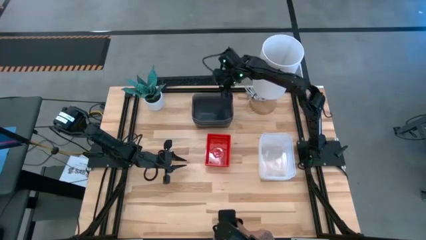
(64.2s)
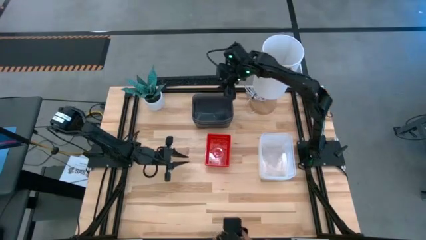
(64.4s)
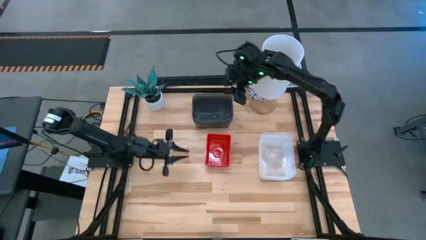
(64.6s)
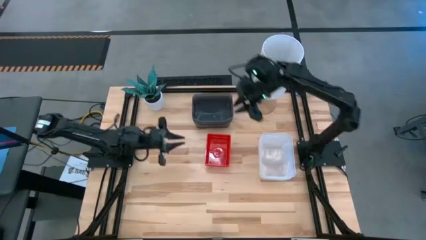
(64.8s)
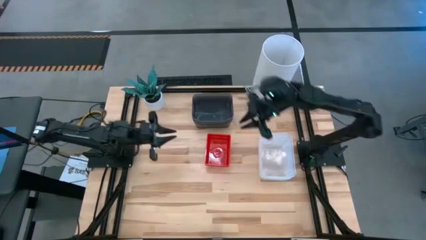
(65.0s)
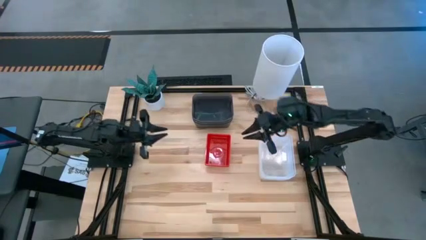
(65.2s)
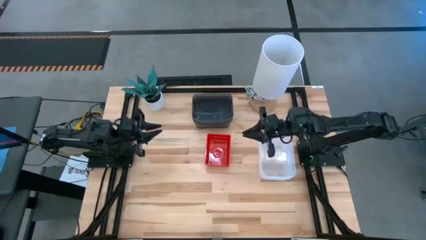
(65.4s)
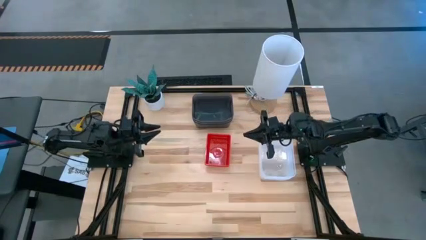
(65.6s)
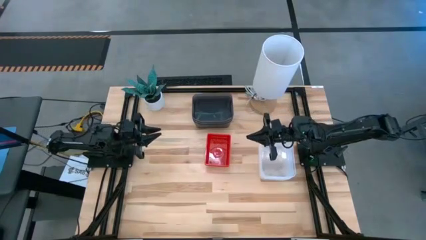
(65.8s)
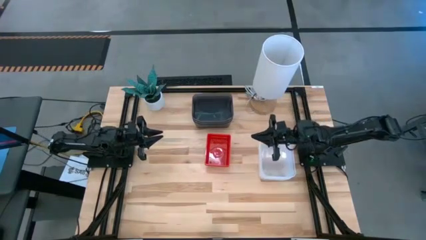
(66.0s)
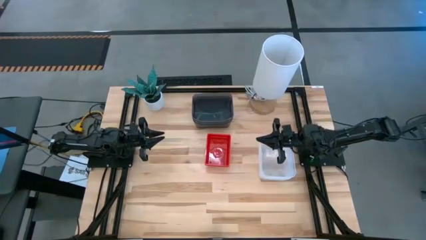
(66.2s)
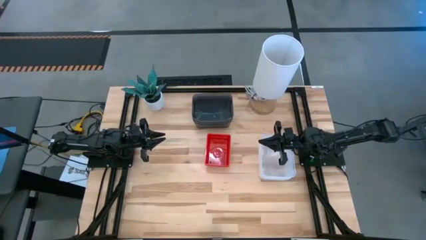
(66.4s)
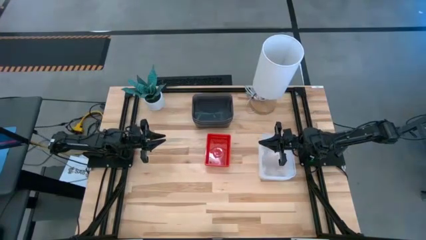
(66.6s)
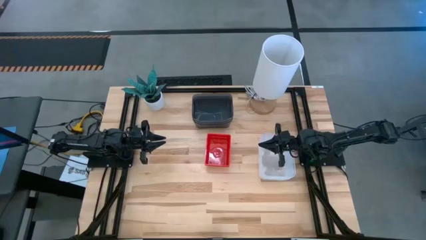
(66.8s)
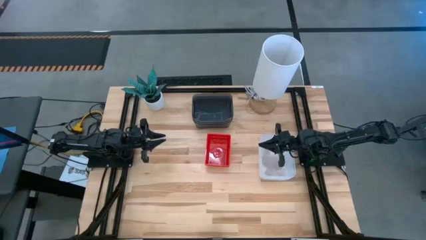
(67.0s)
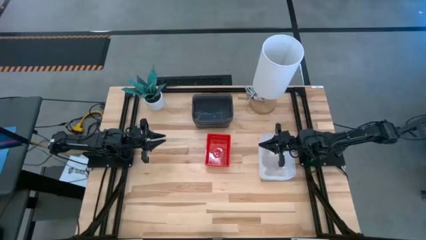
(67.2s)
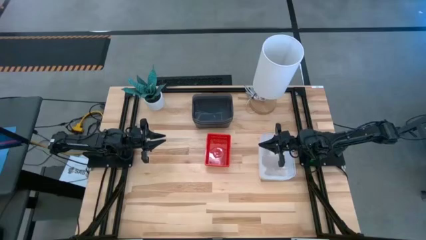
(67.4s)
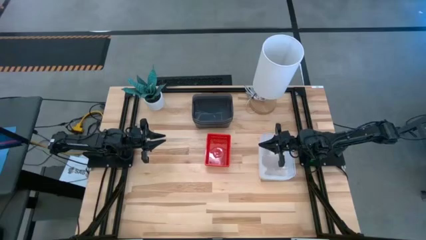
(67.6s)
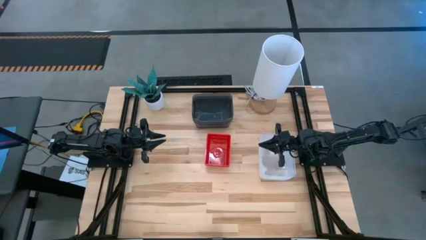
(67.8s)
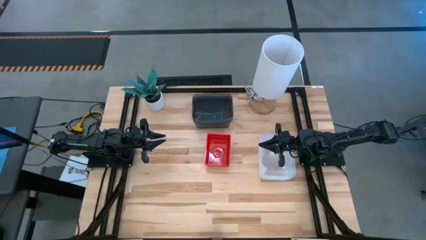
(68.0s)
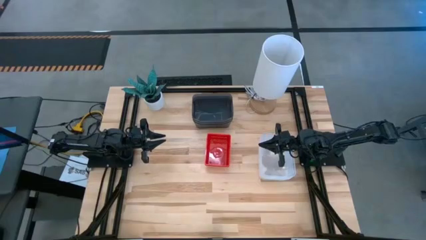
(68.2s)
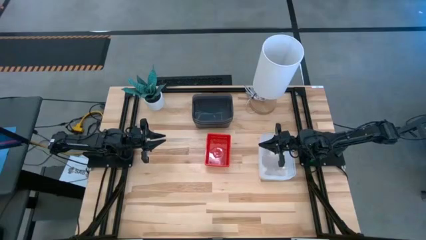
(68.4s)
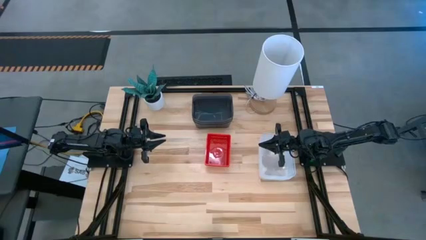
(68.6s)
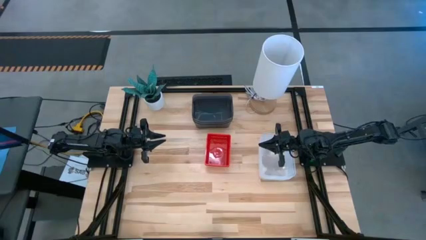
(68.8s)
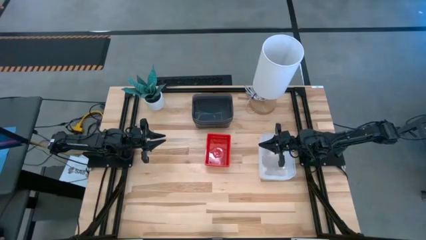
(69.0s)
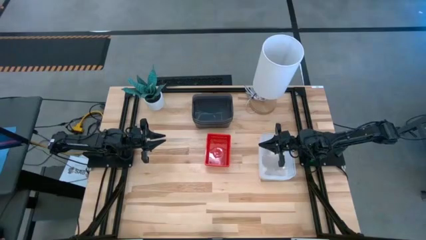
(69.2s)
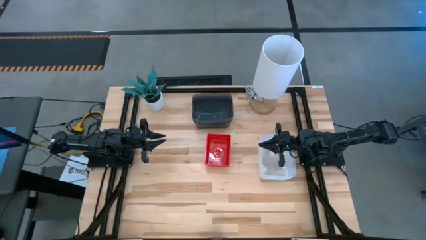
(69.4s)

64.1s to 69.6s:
Return to Home Position
